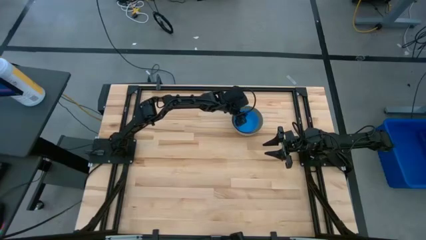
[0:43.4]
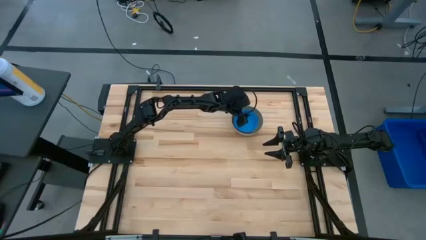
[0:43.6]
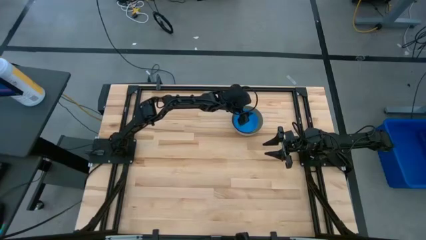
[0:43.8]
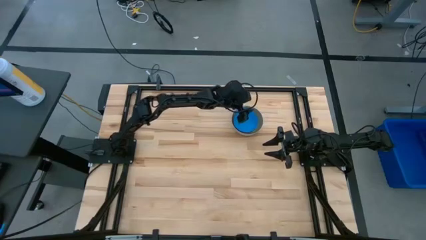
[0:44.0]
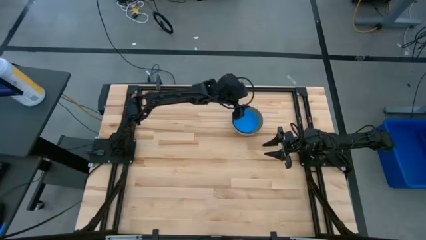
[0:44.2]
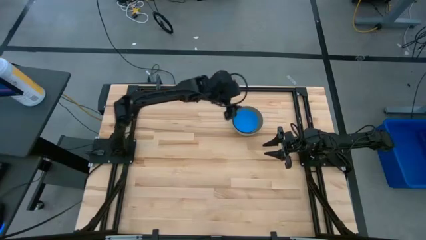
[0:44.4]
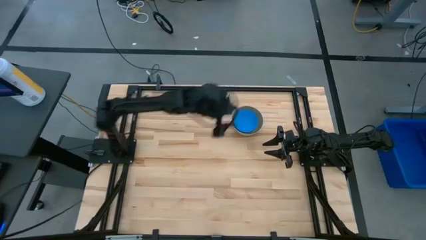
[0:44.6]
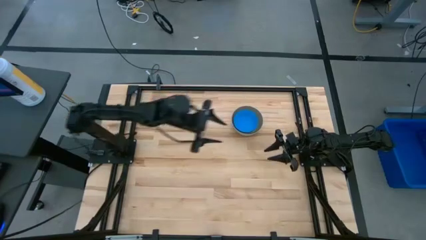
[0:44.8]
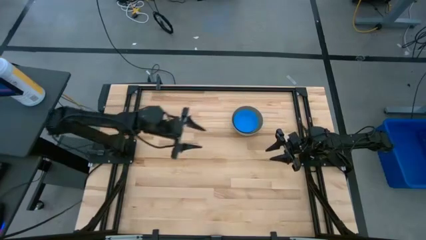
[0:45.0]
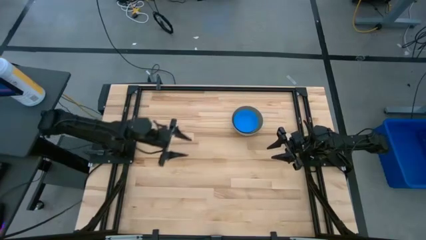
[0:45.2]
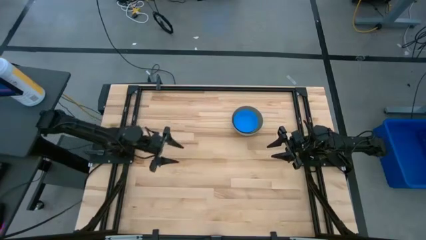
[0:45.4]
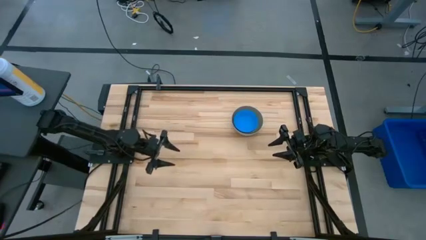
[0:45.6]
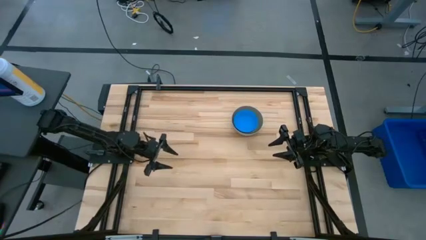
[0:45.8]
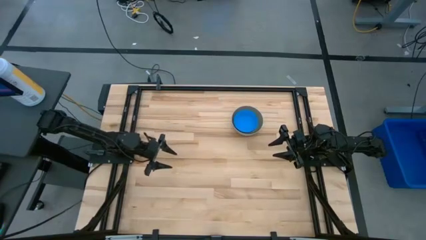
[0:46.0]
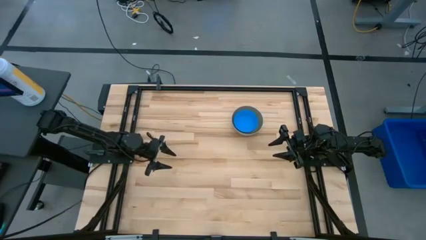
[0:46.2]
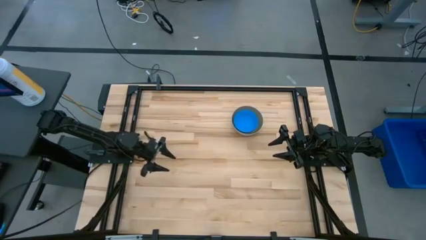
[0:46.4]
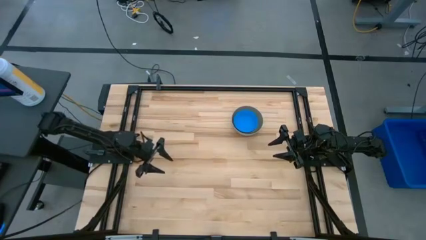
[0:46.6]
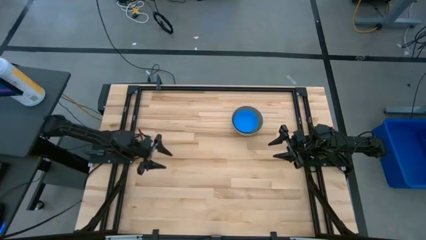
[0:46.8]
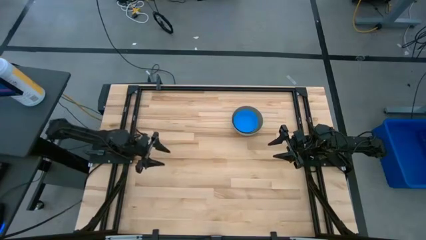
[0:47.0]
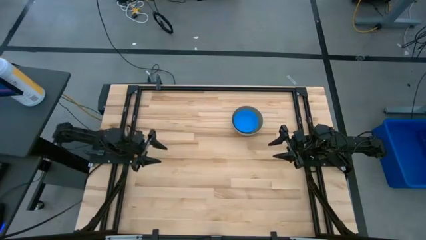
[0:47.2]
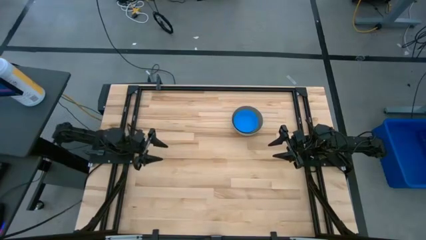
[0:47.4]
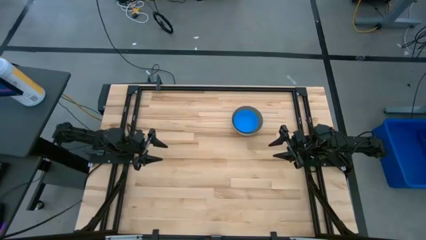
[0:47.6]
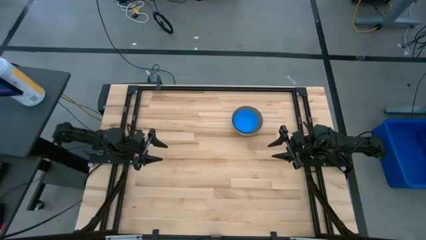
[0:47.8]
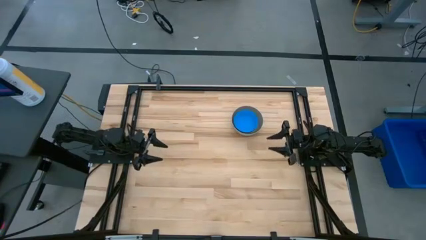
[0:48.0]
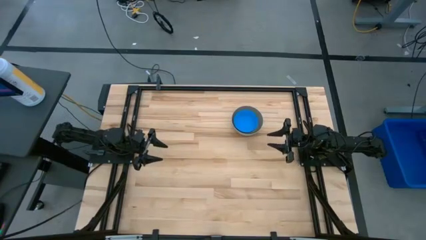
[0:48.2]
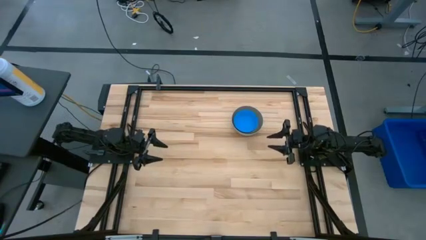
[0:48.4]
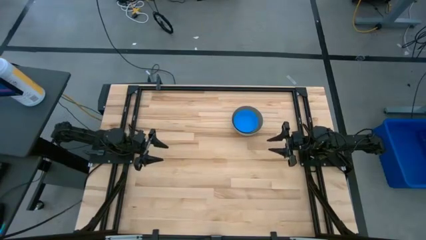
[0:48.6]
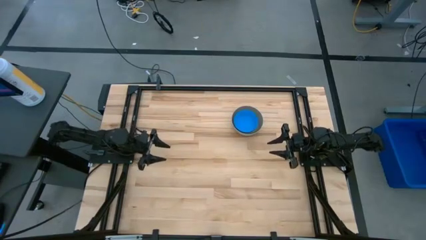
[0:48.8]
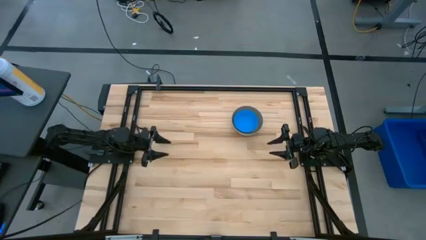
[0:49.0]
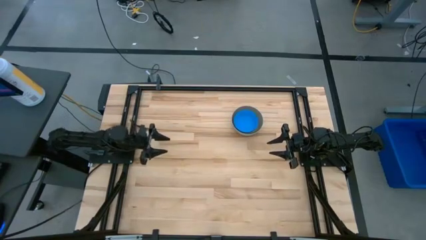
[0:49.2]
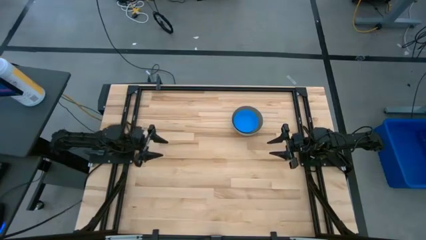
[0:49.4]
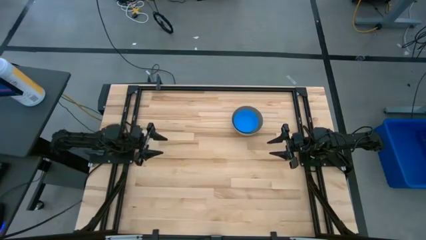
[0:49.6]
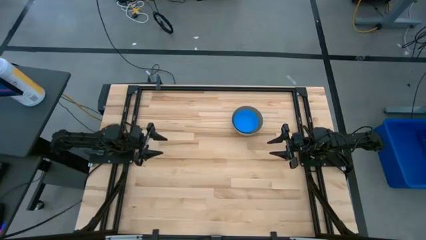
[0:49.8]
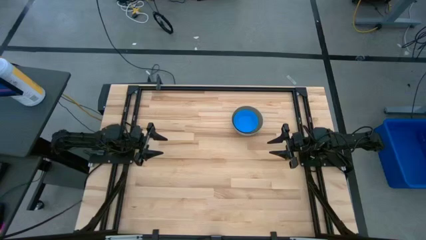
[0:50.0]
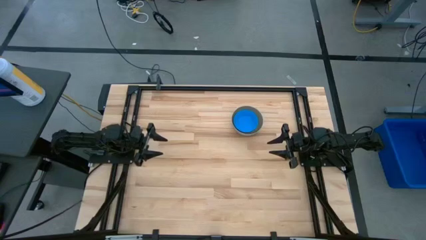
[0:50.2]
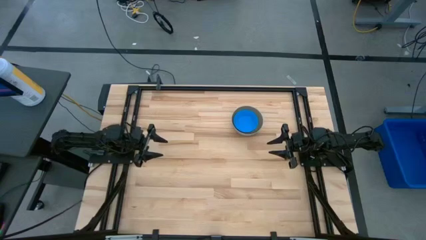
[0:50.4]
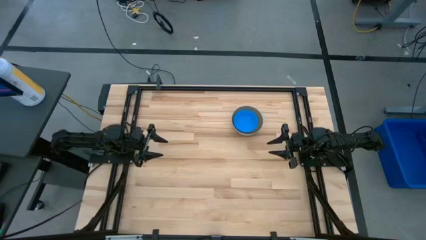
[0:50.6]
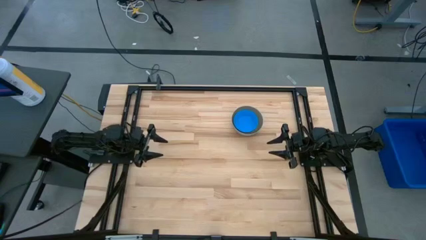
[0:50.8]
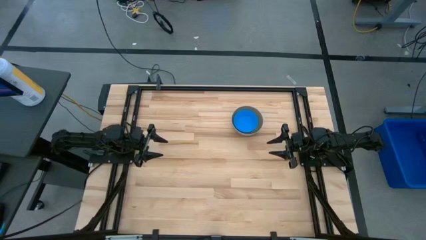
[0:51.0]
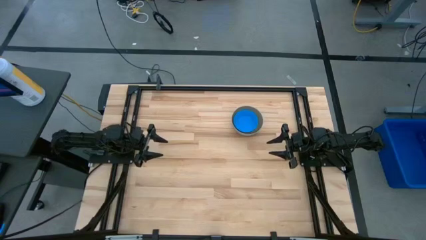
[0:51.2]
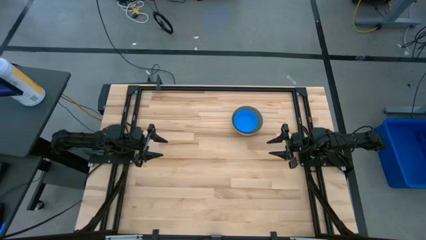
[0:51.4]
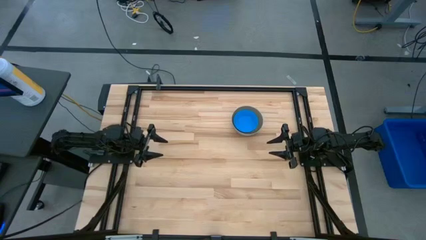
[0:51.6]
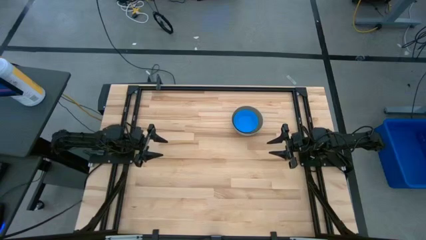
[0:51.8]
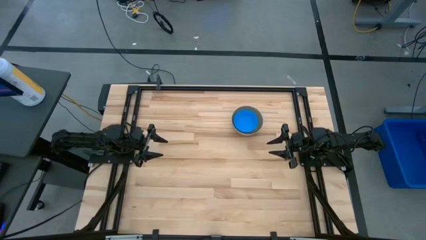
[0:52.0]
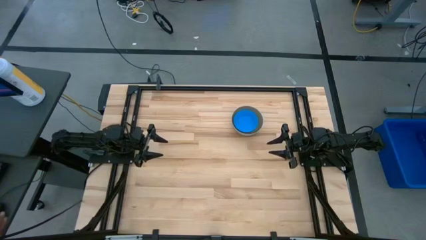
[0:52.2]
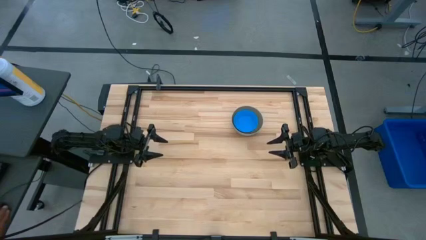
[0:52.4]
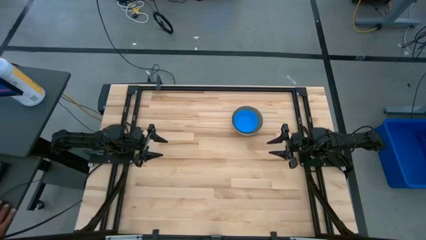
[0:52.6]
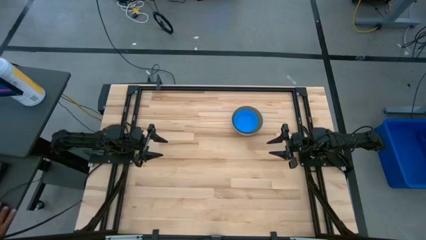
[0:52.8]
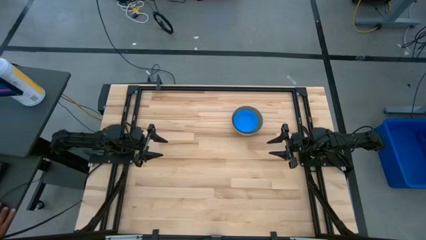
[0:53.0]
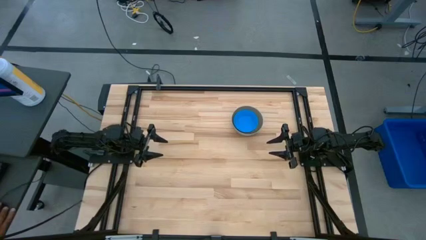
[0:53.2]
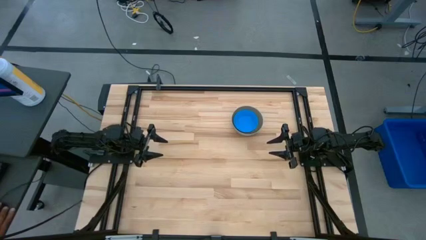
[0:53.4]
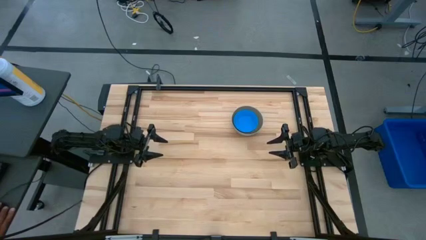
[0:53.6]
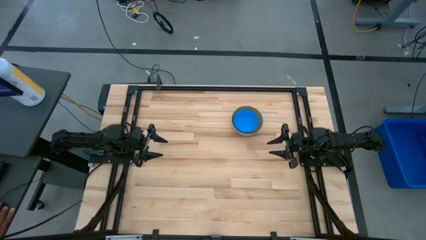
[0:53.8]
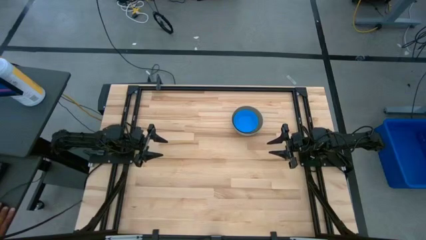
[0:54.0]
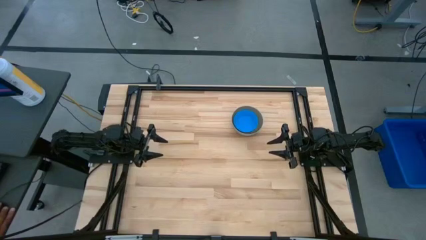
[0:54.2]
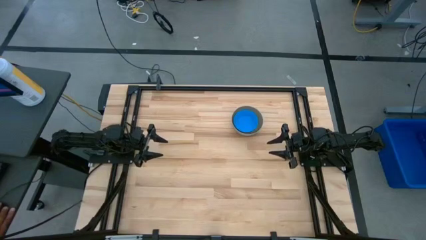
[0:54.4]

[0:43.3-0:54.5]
Return to Home Position

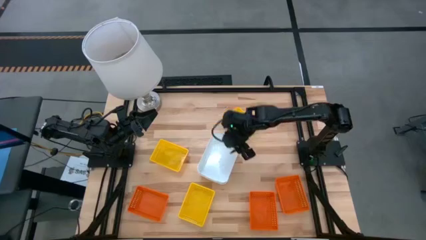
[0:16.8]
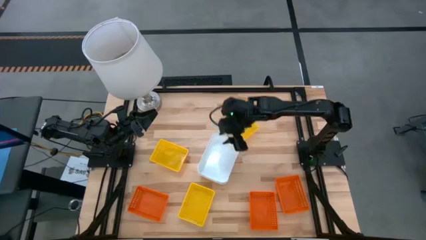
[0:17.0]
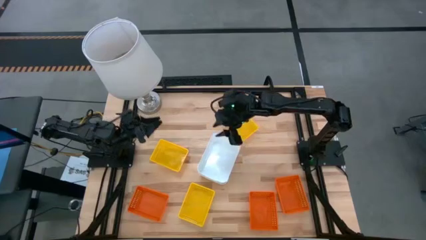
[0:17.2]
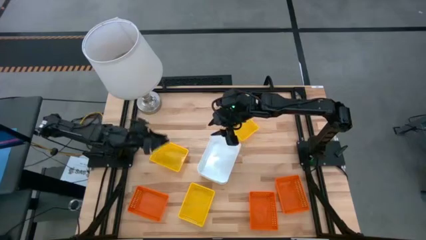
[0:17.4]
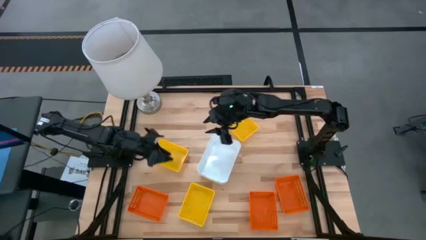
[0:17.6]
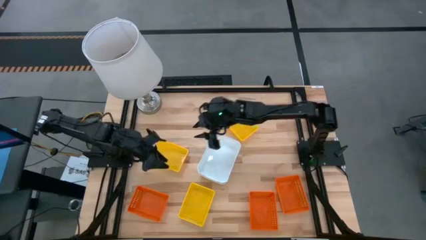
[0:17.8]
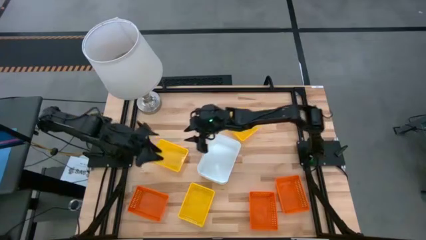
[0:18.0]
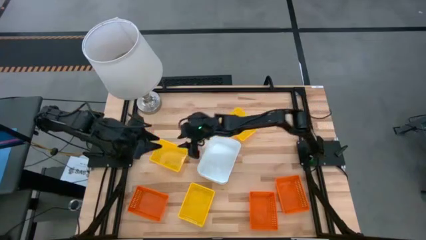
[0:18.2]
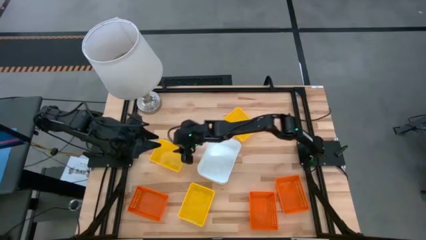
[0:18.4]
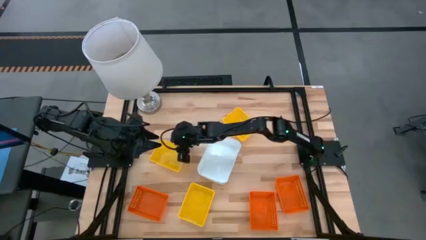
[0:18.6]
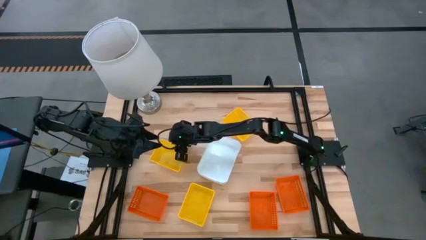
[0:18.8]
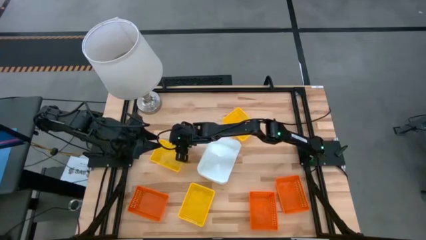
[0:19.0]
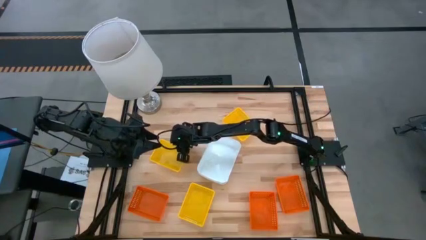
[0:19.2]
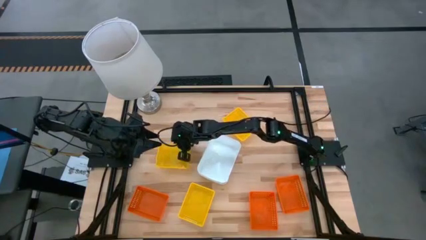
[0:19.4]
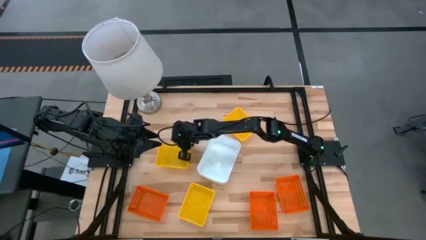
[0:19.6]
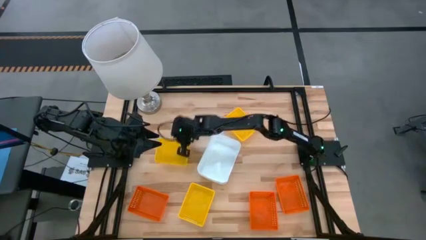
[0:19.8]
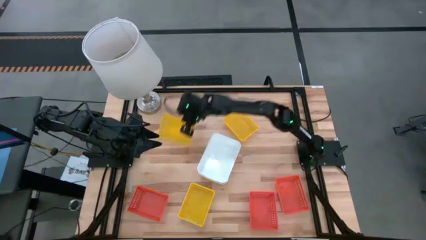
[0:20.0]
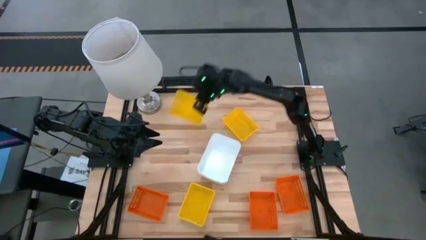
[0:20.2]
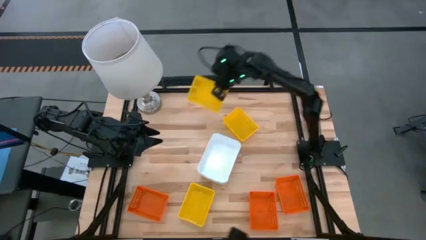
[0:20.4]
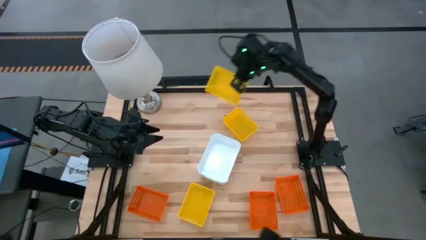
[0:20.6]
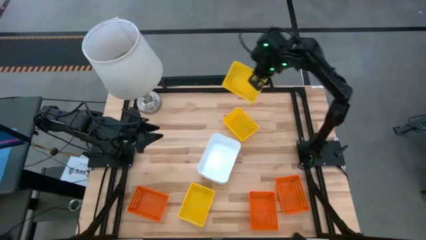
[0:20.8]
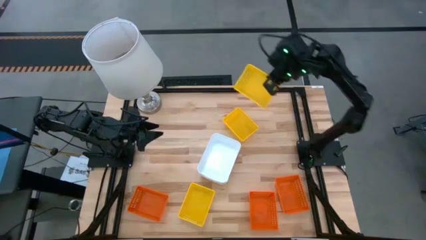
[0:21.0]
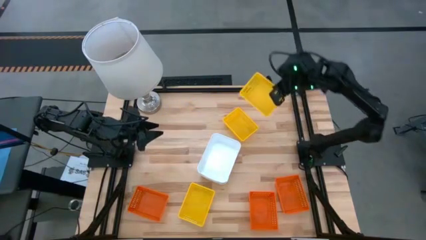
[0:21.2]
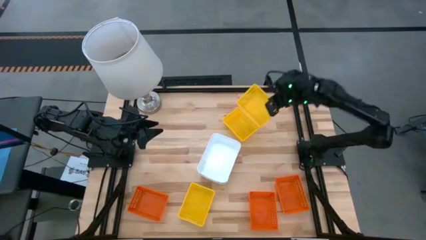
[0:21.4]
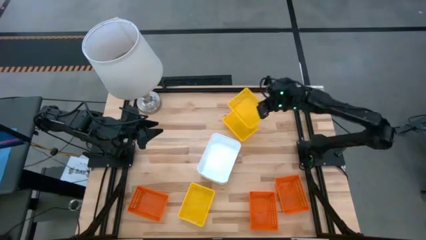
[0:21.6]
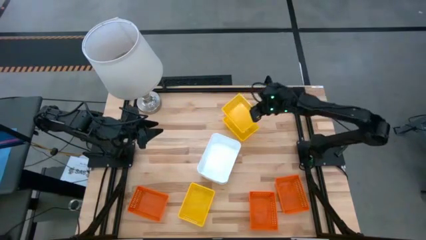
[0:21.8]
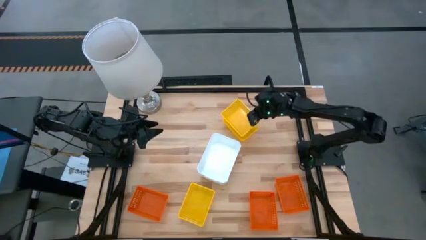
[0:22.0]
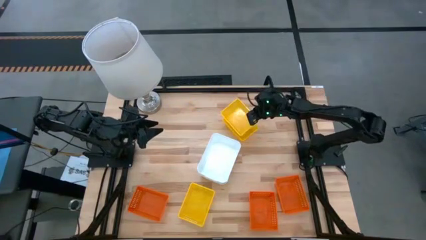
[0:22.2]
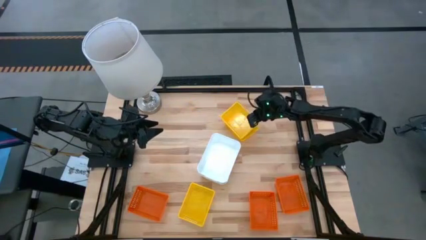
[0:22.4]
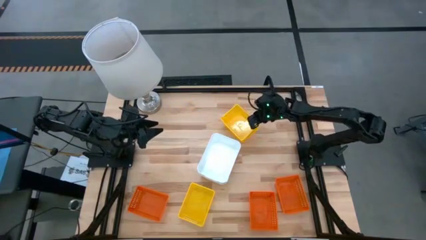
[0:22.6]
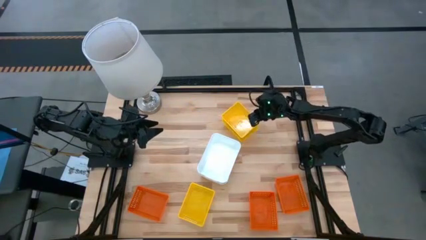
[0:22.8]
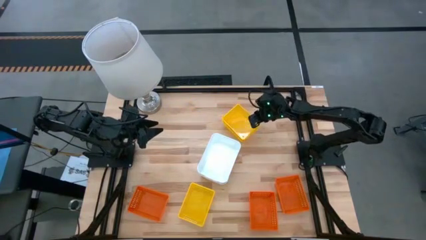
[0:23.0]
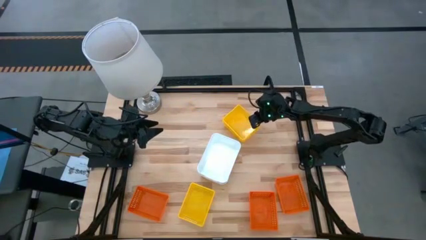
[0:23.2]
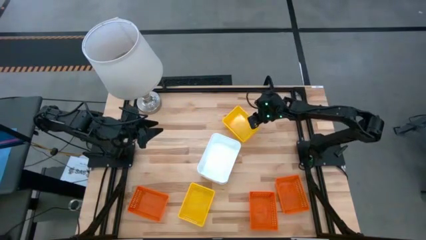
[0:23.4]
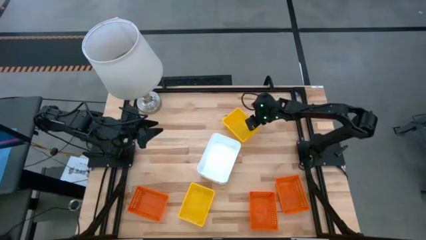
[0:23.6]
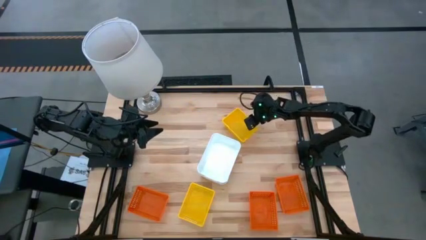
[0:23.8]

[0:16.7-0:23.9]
Stack the middle yellow bin on the top yellow bin
